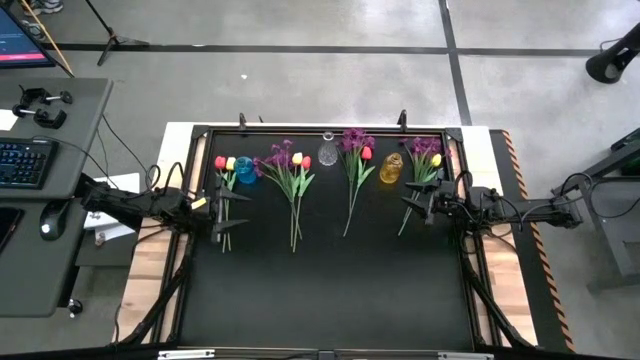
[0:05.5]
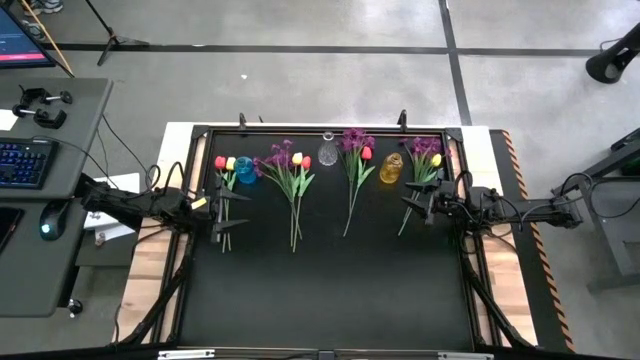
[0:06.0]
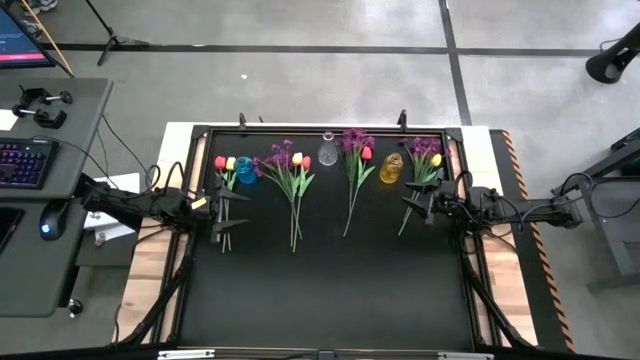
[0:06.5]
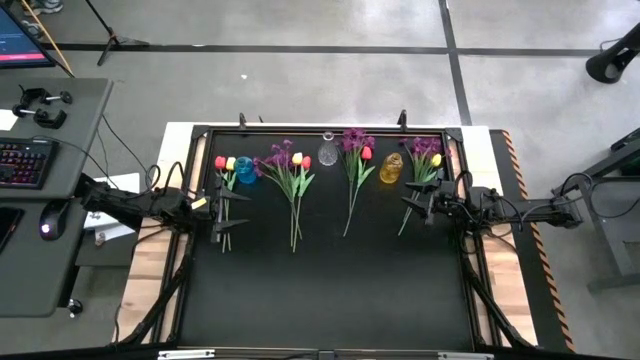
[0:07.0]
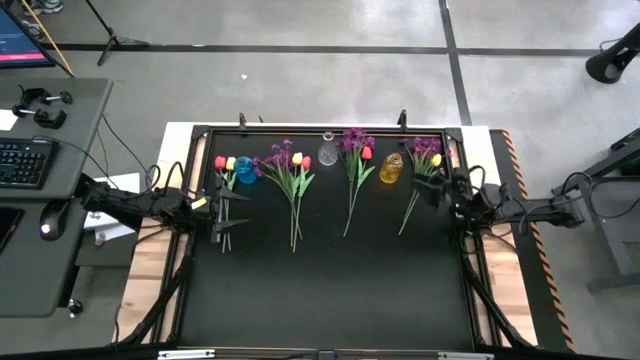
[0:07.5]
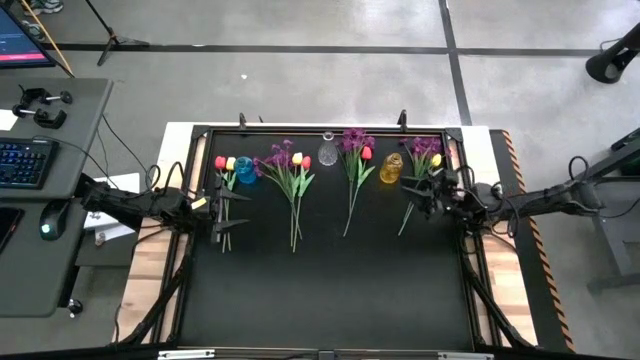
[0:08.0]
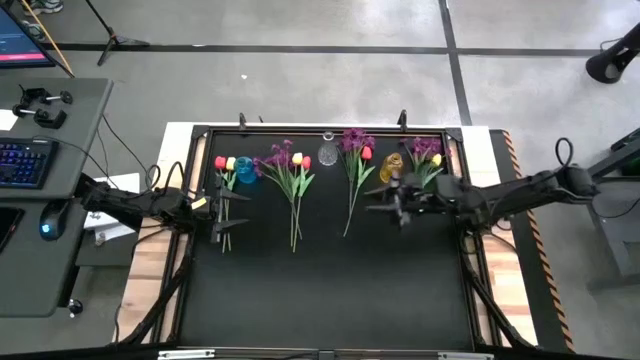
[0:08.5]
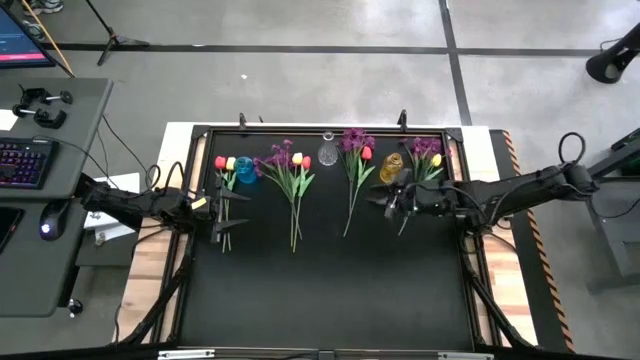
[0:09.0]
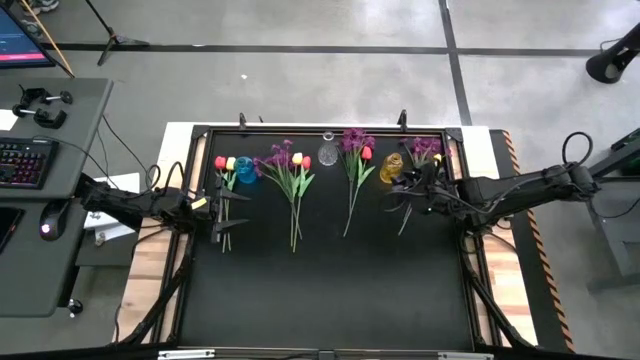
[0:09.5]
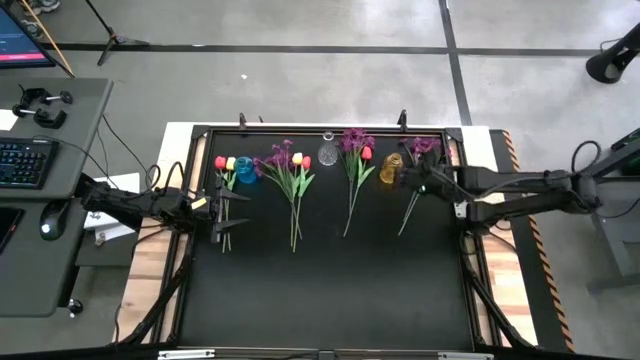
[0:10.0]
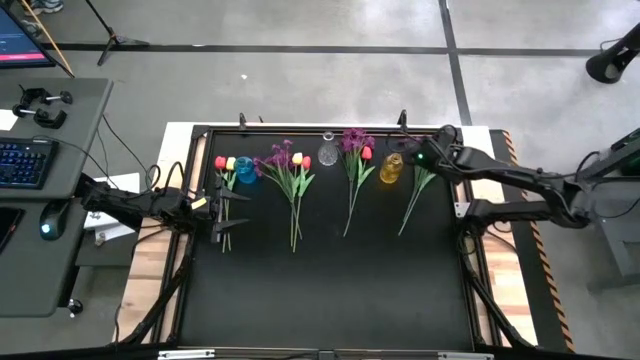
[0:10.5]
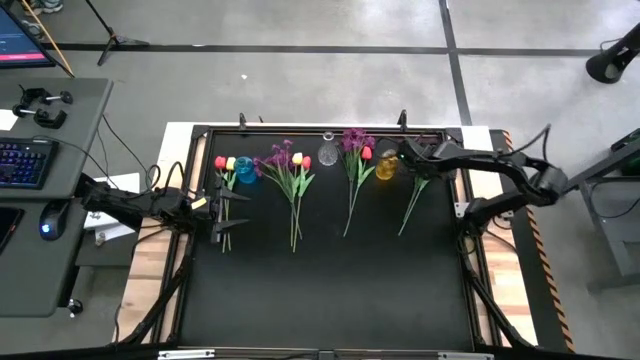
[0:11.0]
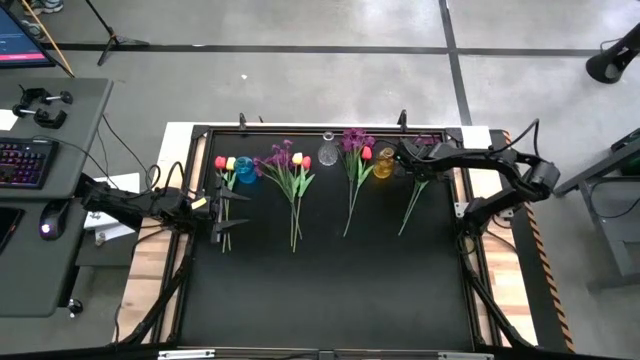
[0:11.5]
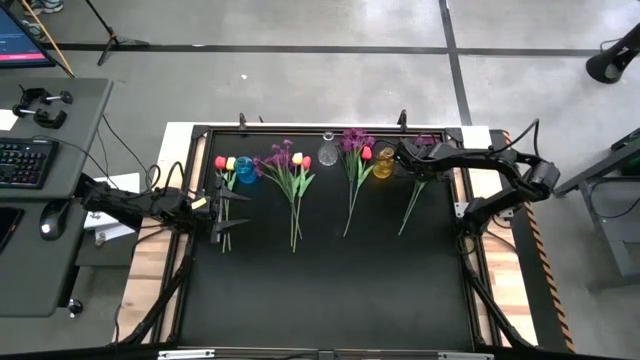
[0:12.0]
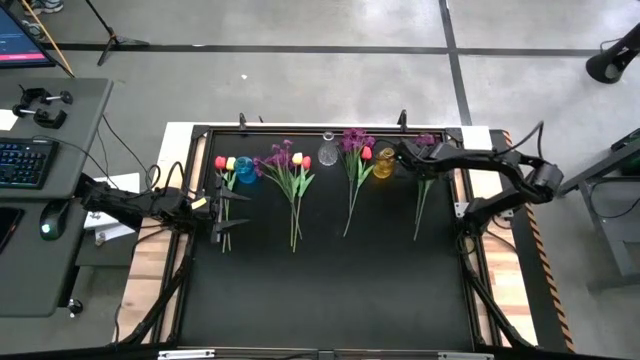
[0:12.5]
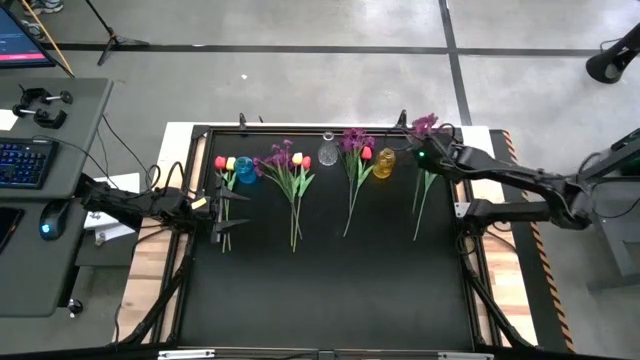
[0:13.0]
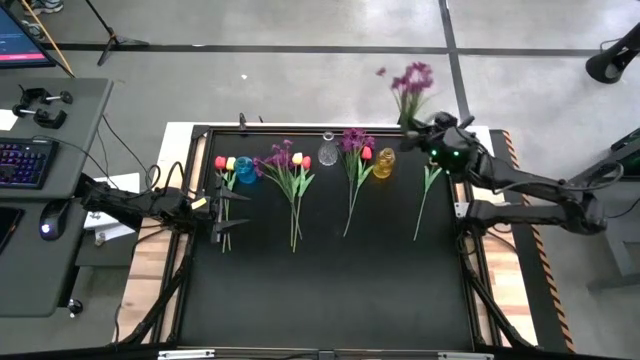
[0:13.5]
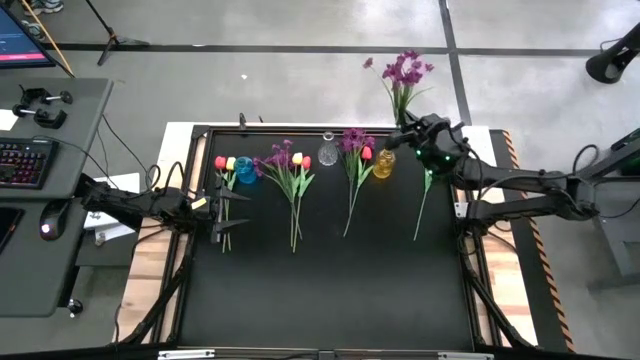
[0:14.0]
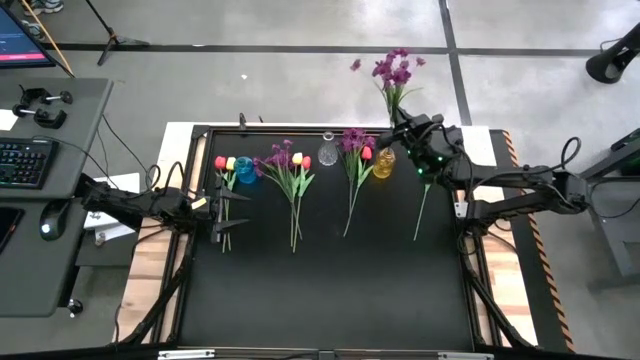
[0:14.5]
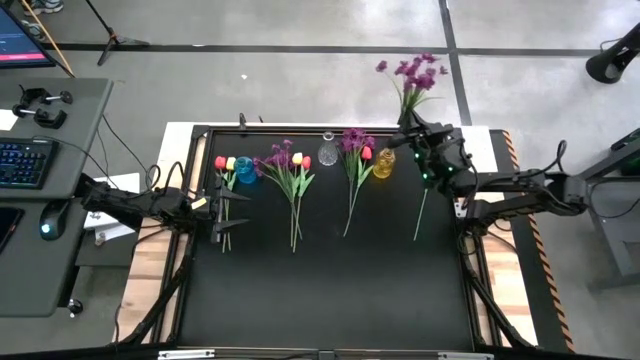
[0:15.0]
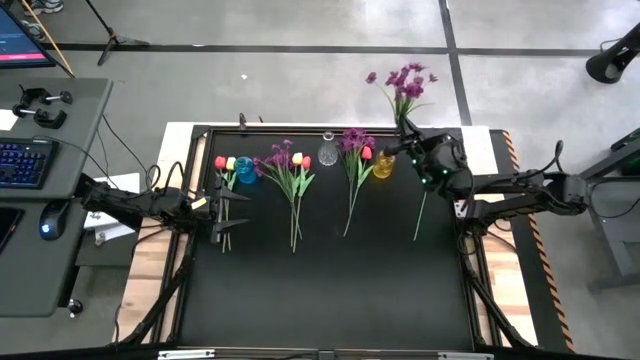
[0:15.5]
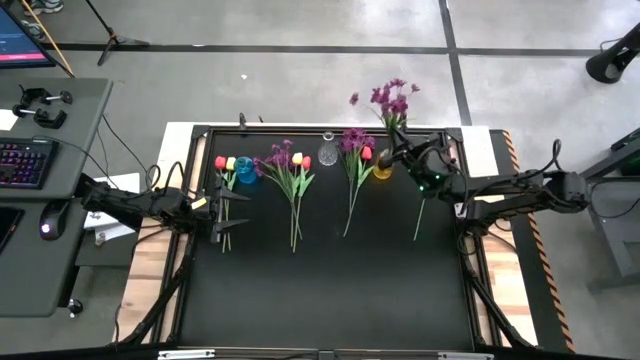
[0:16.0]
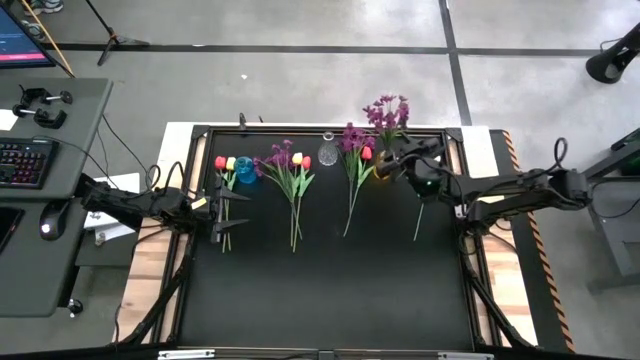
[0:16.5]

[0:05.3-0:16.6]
Task: Sort flowers into vase by color
Put the right purple flower into the yellow vase

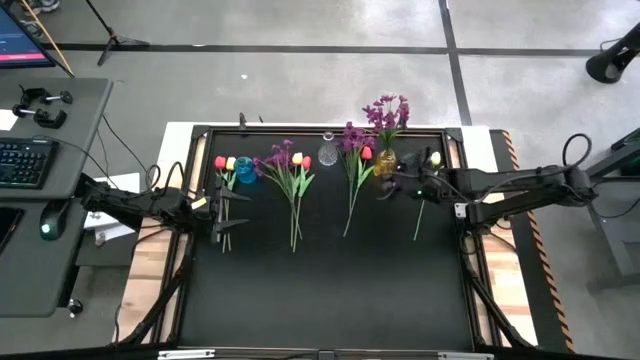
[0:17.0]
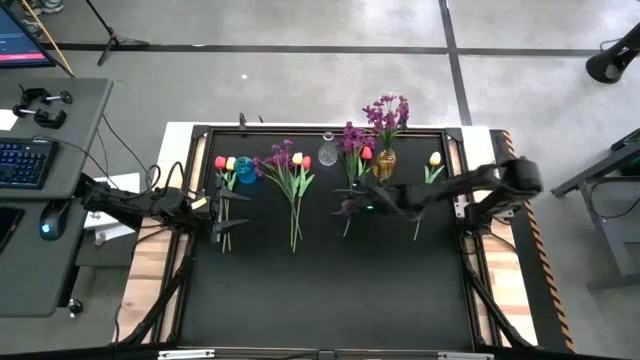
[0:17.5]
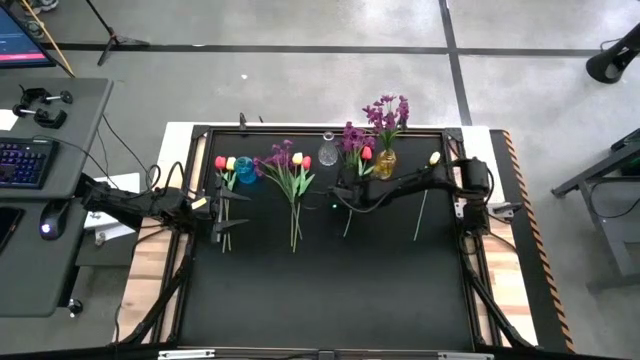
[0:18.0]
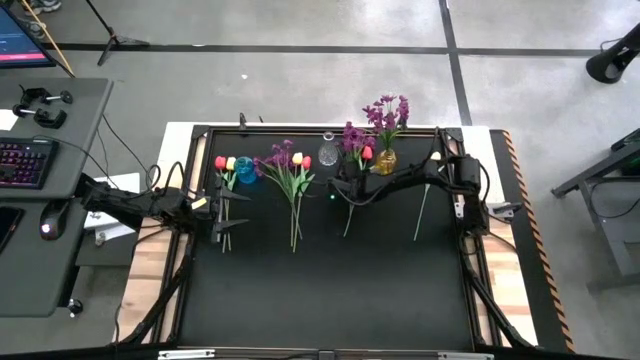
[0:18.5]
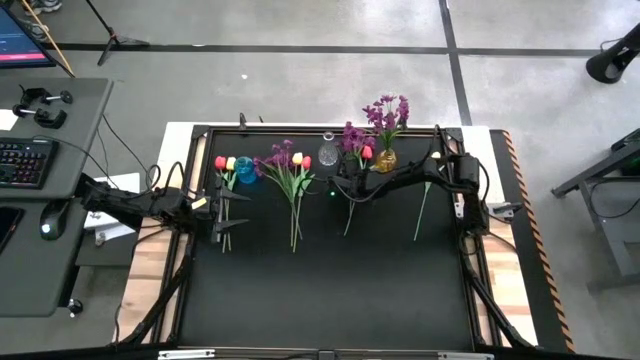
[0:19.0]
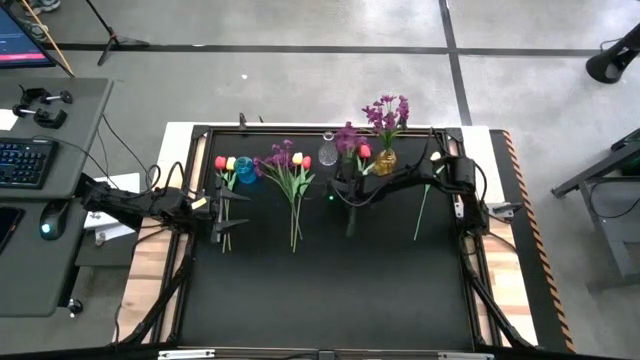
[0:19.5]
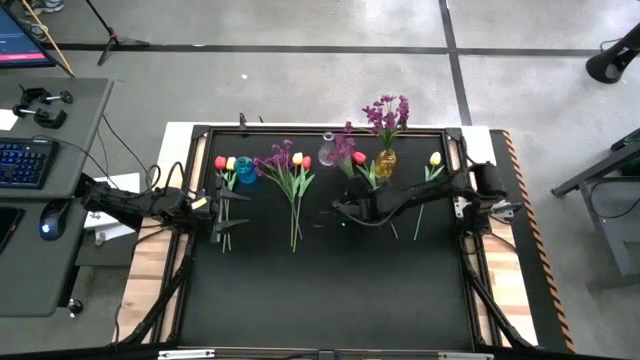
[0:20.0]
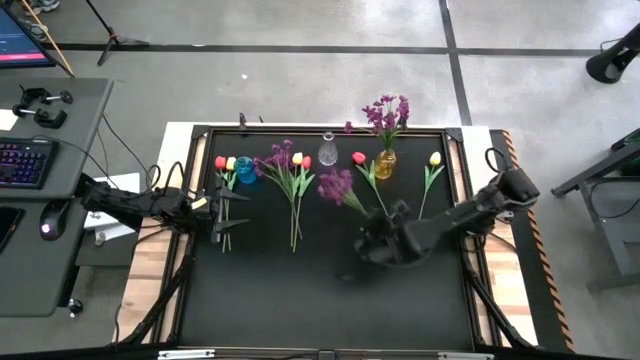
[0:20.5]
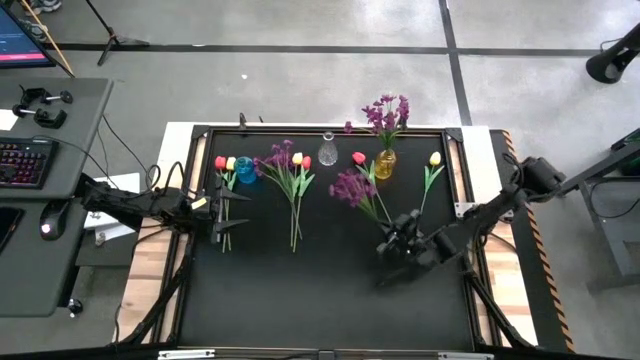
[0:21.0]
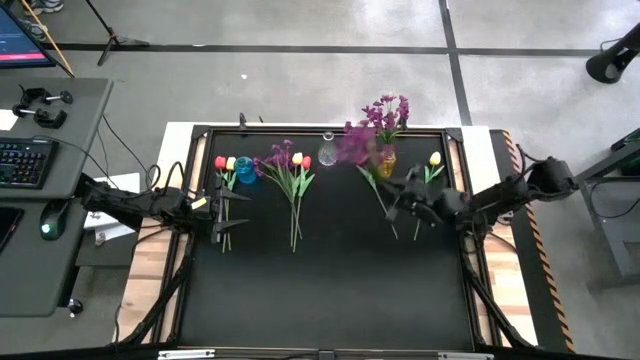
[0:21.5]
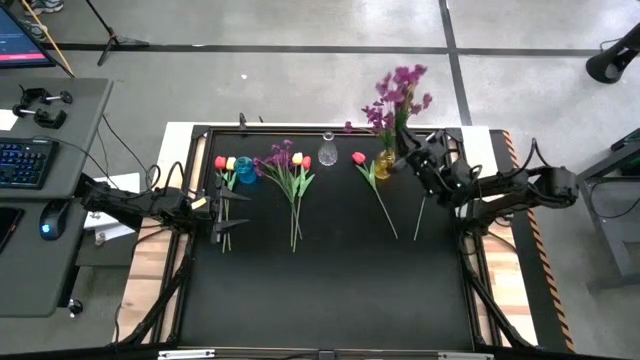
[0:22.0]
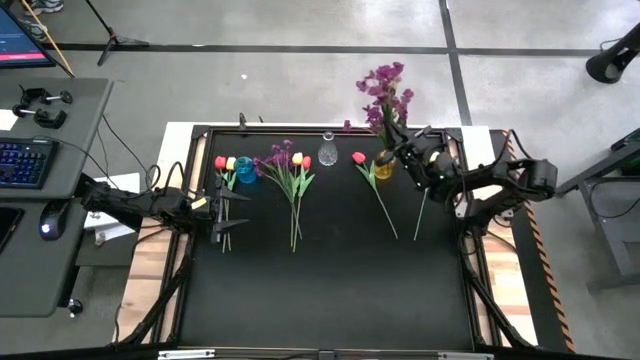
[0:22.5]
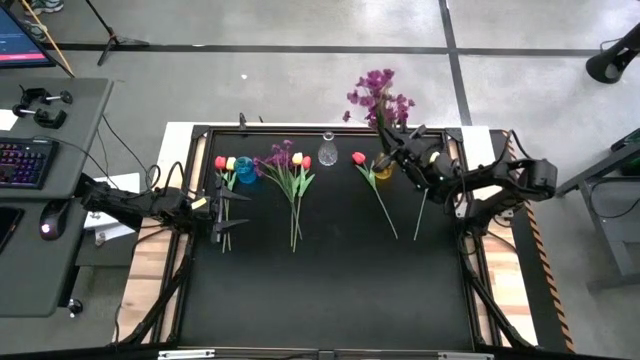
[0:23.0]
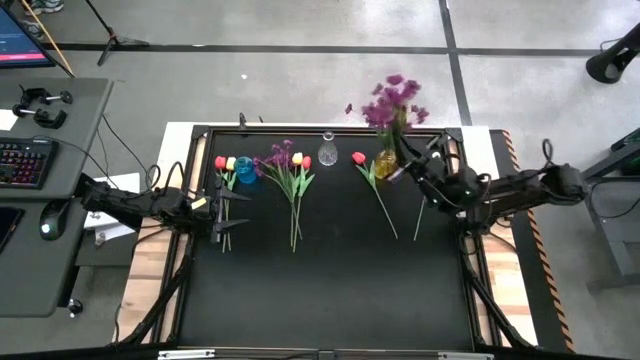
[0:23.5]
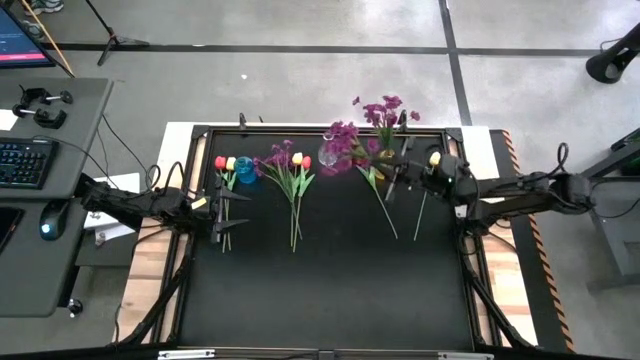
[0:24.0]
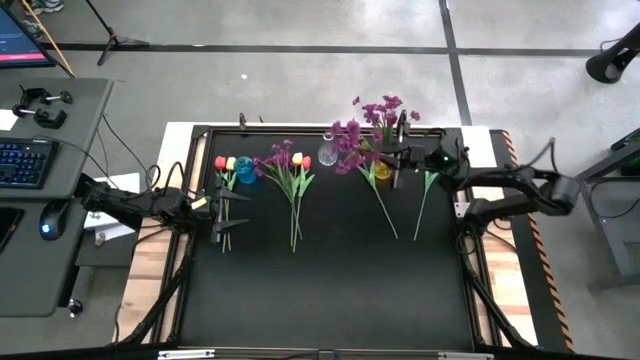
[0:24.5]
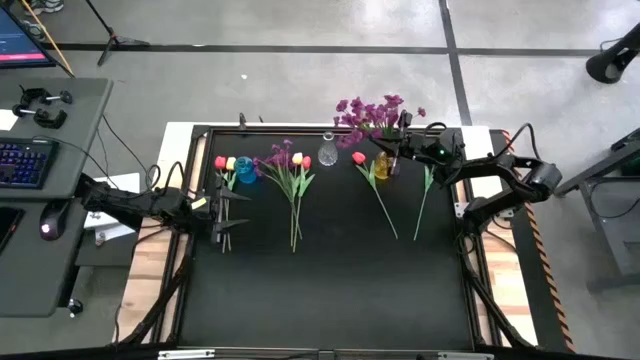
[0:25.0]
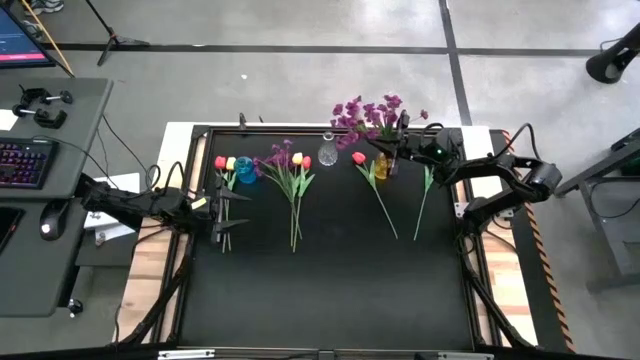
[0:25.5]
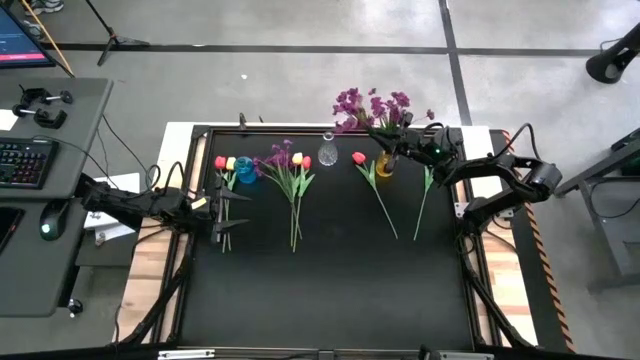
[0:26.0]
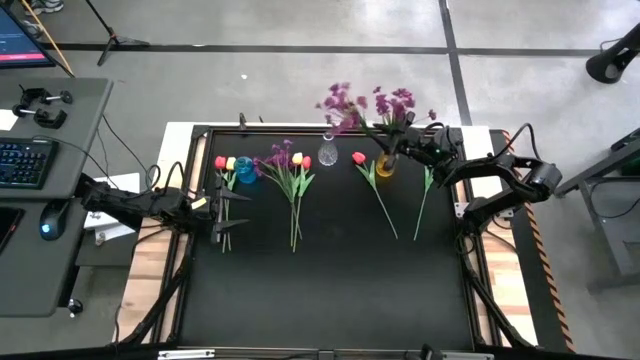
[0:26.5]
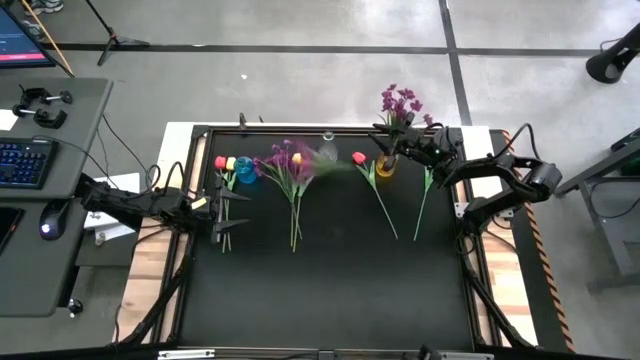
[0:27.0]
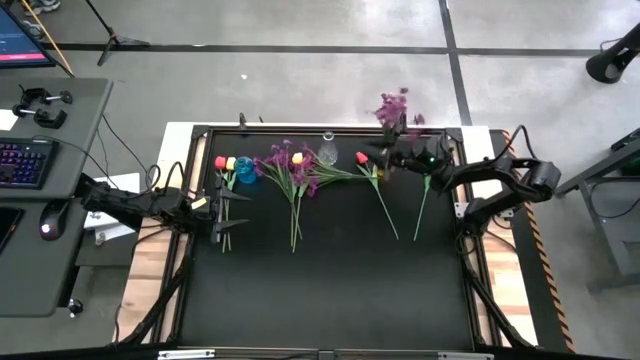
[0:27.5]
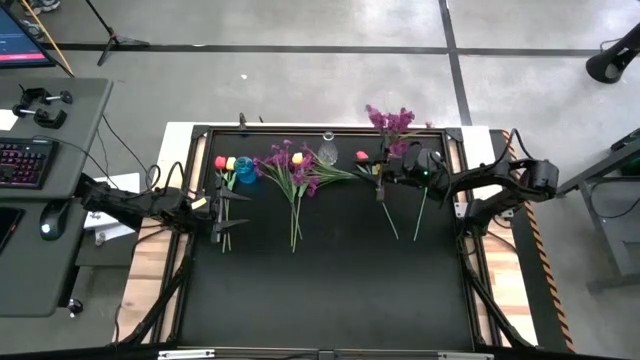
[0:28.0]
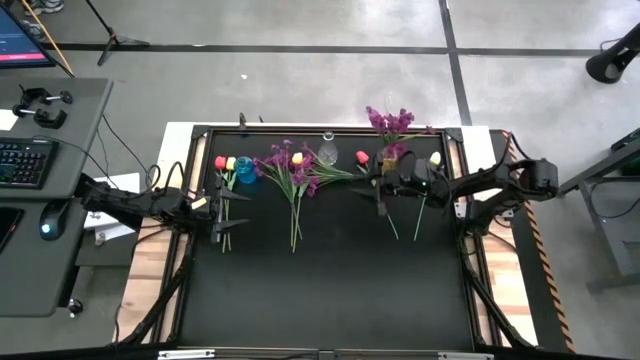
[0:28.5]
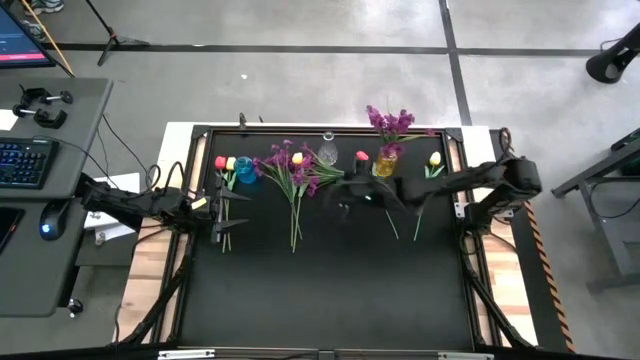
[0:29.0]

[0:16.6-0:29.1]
Put the right purple flower into the yellow vase
